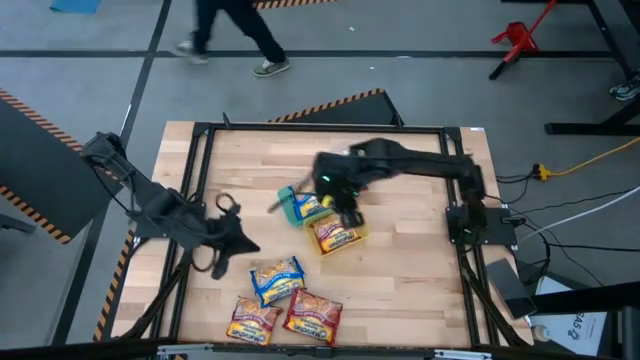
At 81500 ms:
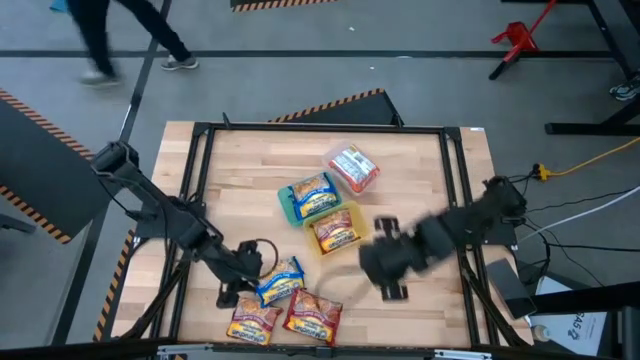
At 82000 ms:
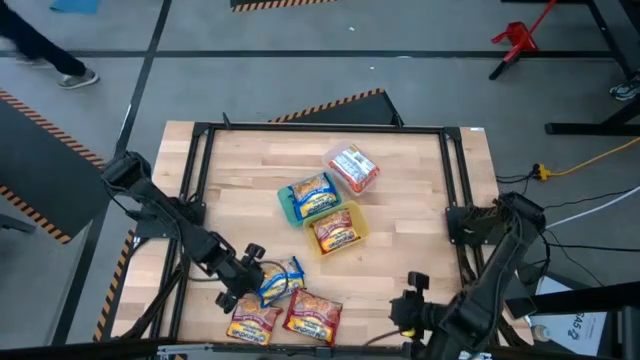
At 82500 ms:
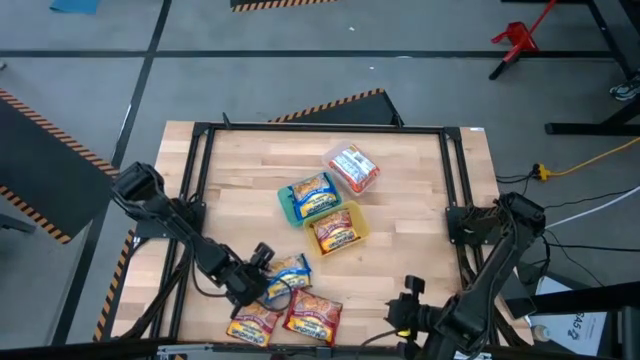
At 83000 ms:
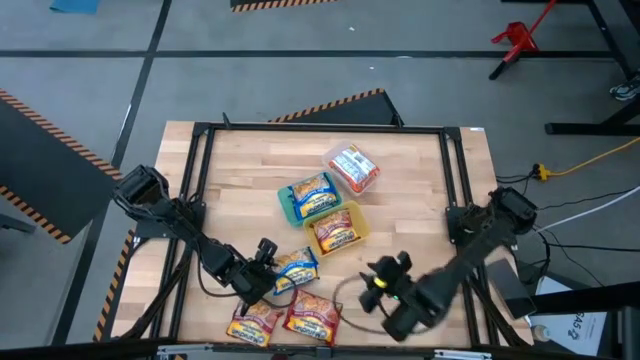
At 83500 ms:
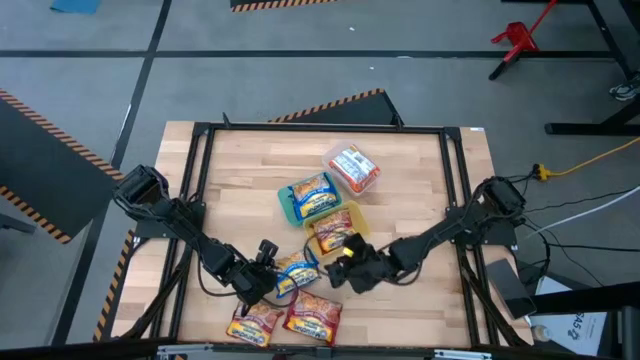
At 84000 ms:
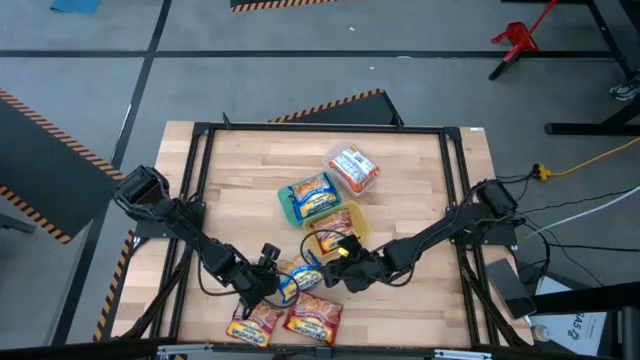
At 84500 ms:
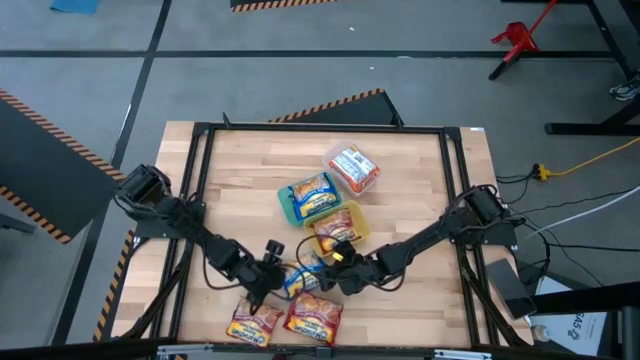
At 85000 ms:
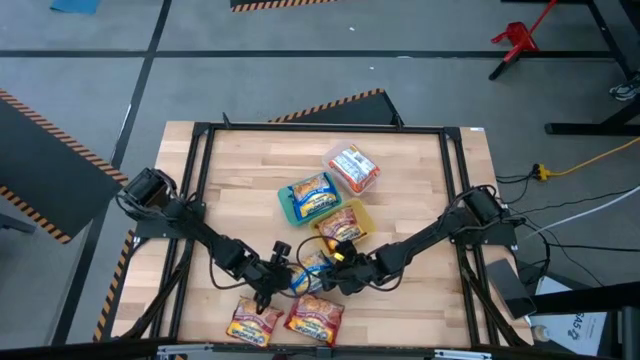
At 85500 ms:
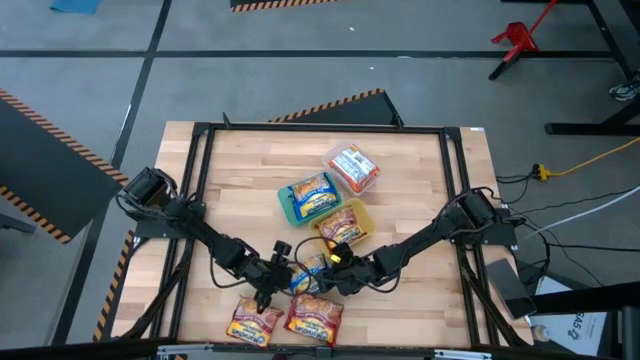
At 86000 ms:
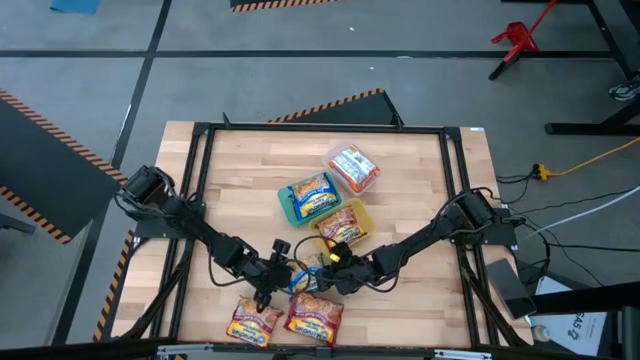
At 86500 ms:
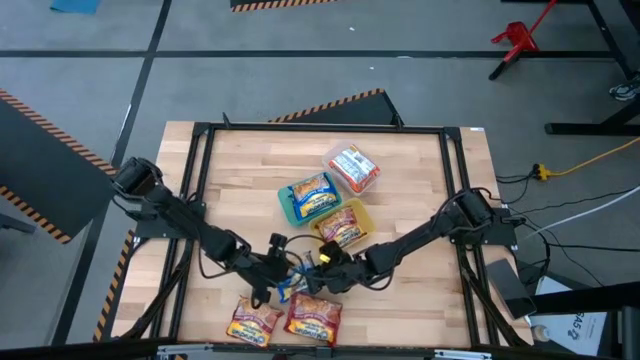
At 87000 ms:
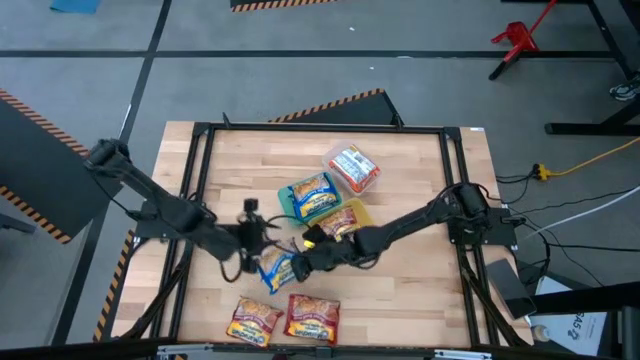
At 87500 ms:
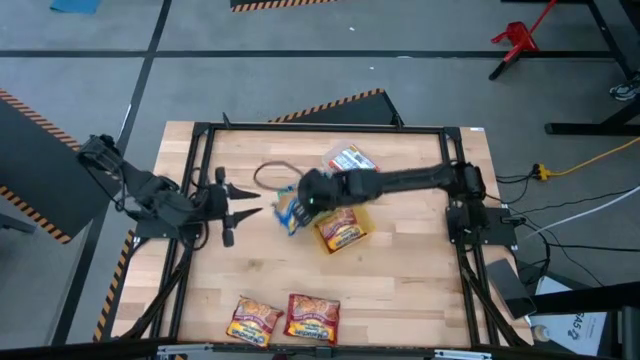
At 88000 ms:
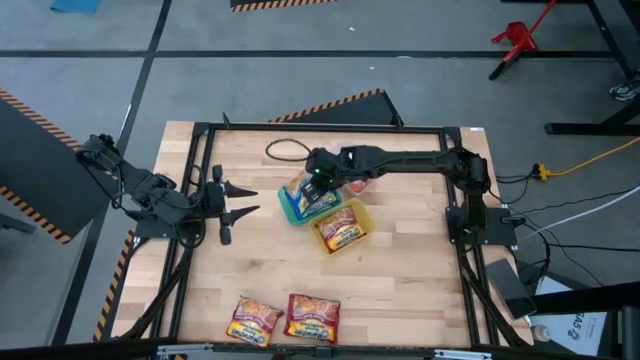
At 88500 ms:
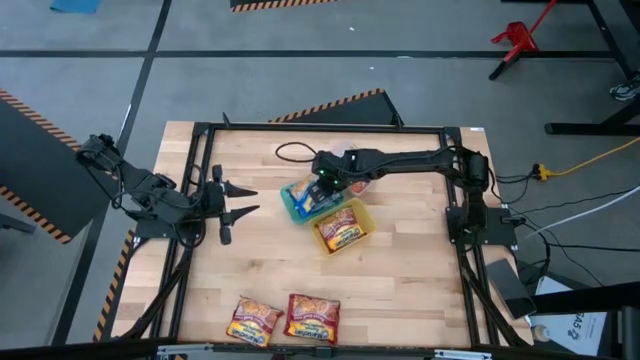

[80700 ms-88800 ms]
Task: Sort Maruchan noodles
Put the blue noodle pack into the green bin

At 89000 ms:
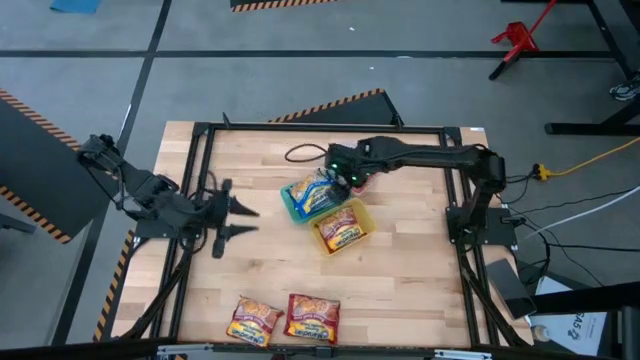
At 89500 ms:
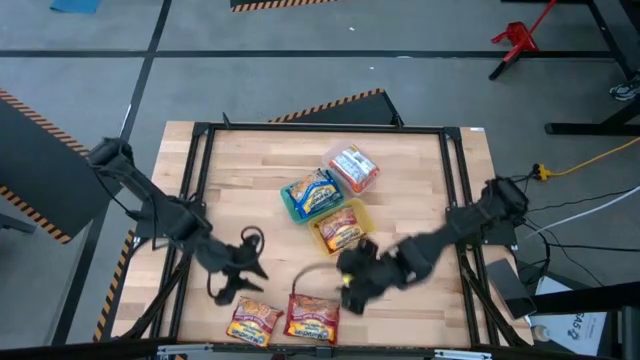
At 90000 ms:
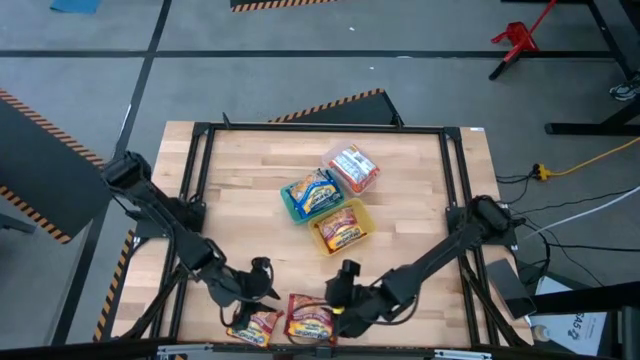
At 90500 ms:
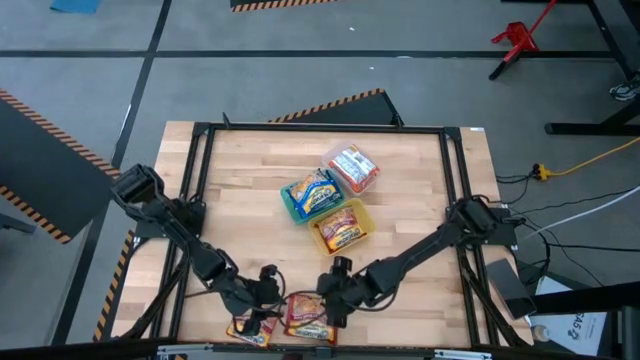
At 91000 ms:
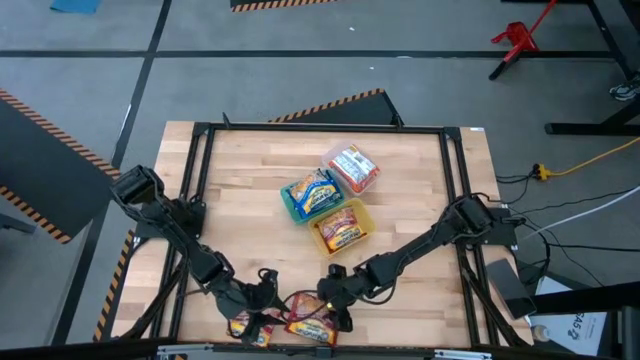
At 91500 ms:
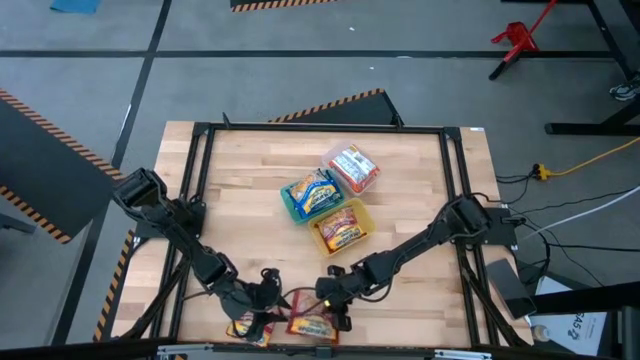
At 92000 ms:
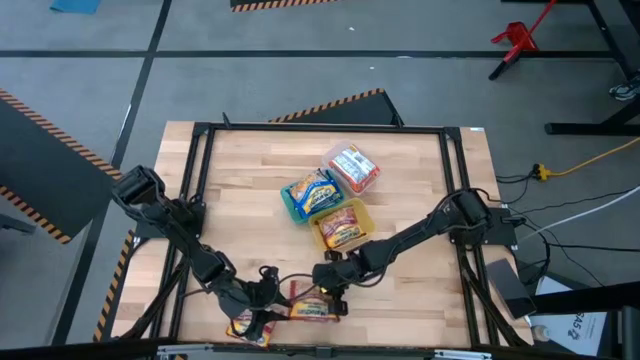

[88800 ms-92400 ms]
Put the right red noodle pack into the yellow bin

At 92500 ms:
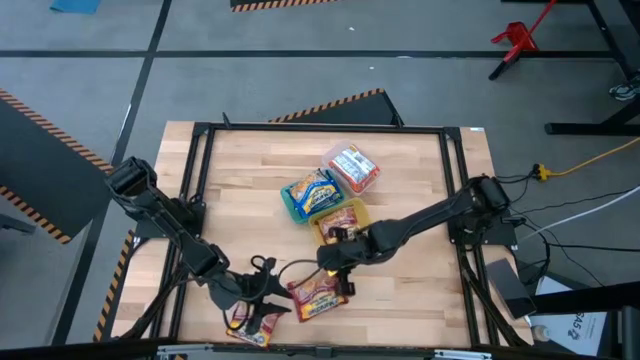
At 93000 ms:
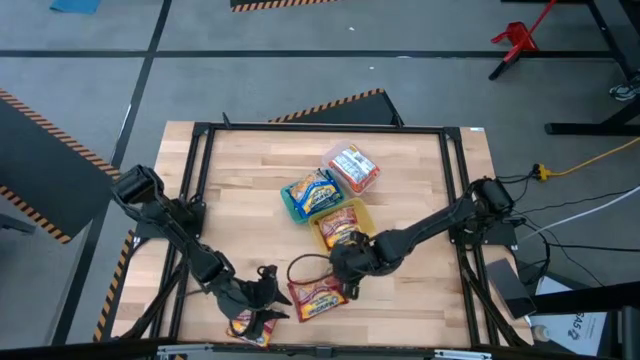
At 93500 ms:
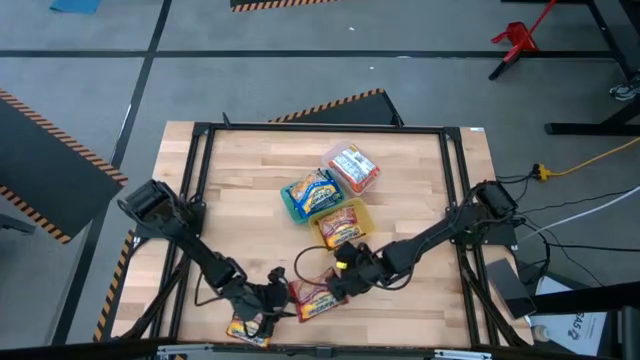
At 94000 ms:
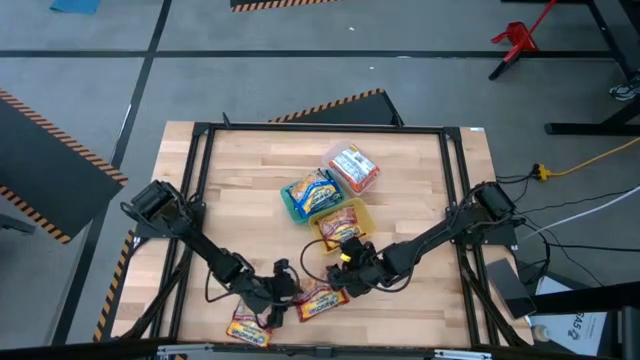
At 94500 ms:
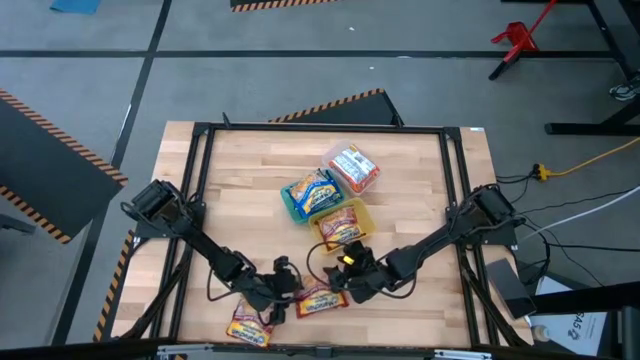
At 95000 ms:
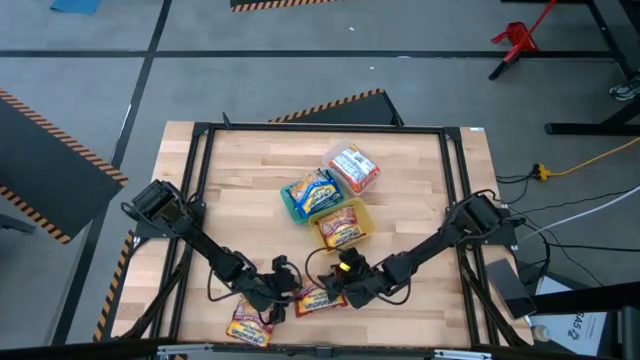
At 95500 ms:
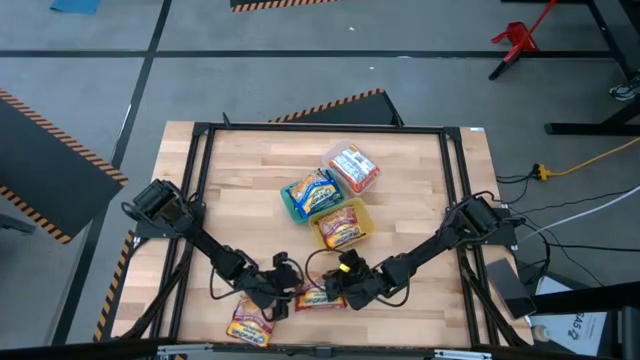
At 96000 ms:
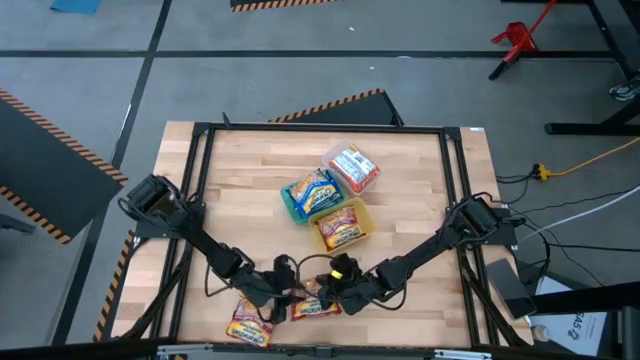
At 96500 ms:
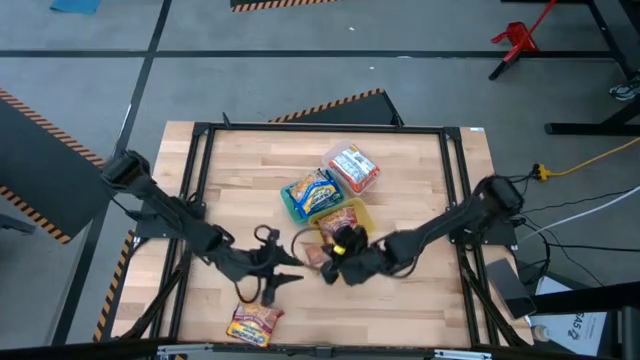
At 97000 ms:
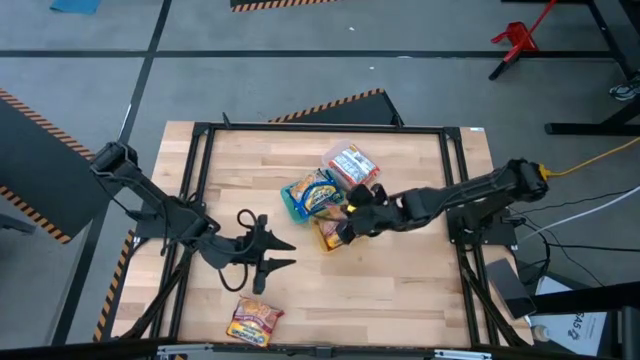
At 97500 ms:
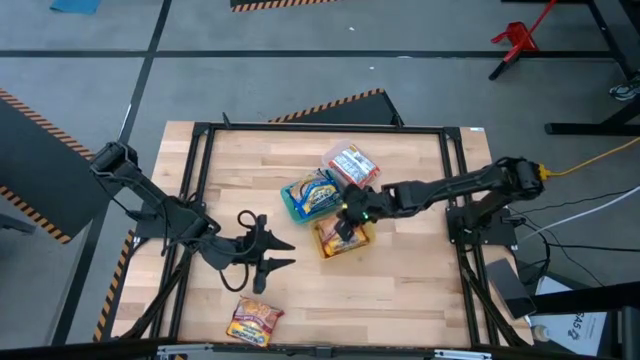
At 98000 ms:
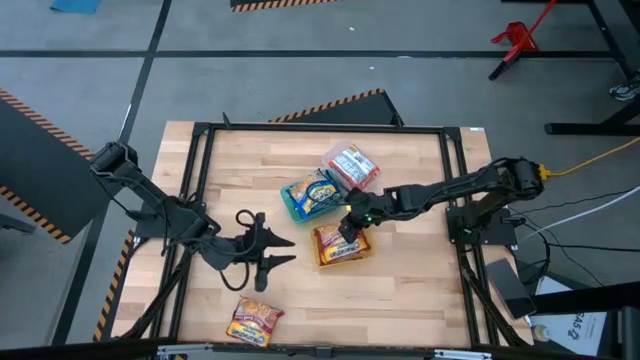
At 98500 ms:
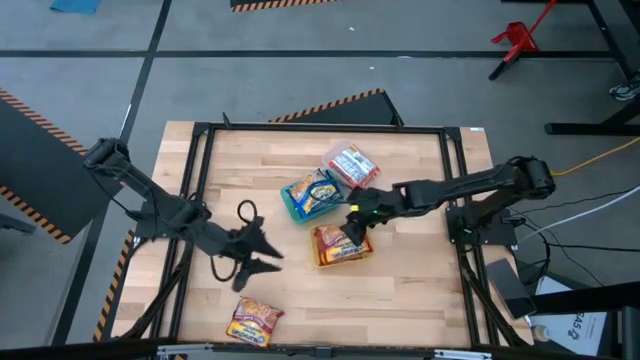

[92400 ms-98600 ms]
Put the right red noodle pack into the yellow bin
